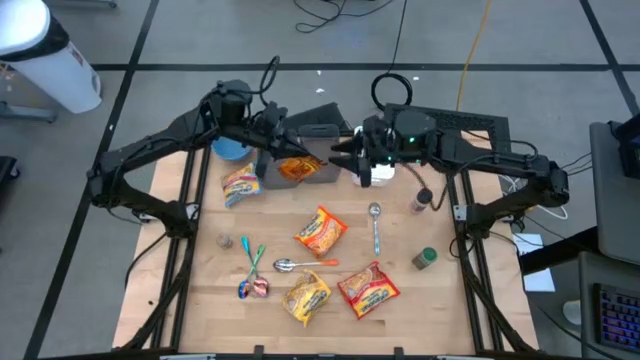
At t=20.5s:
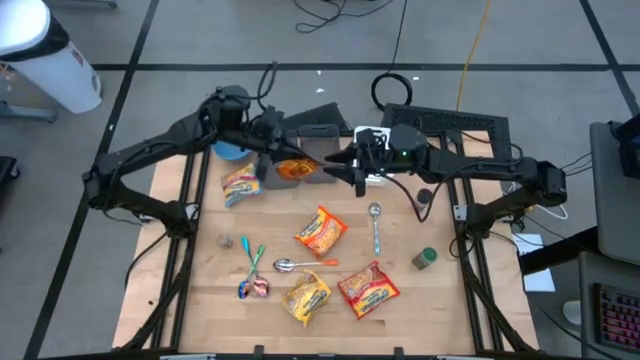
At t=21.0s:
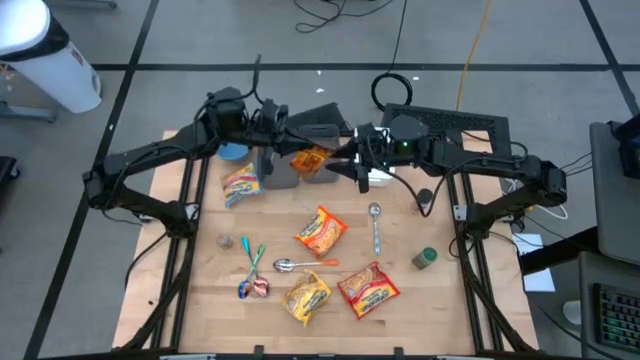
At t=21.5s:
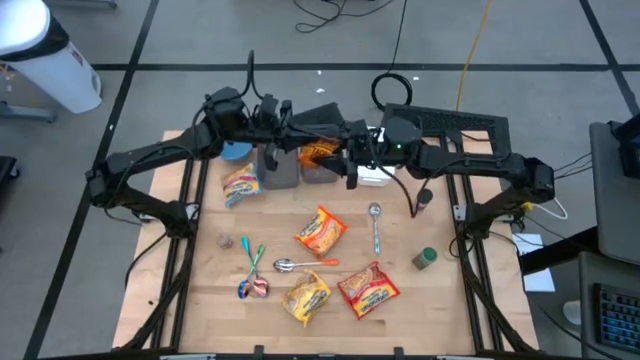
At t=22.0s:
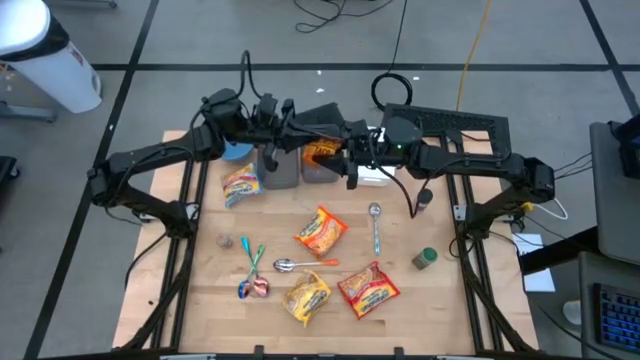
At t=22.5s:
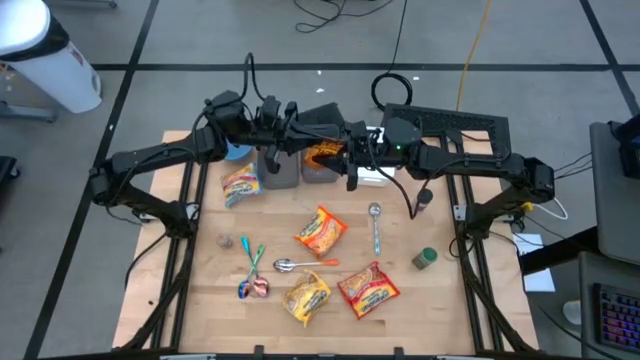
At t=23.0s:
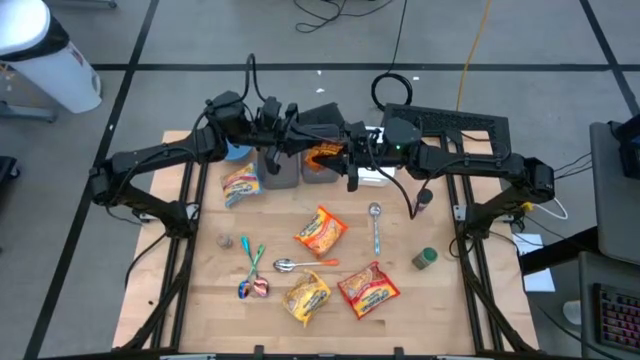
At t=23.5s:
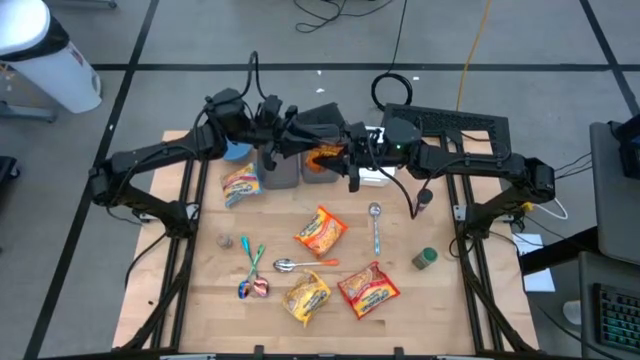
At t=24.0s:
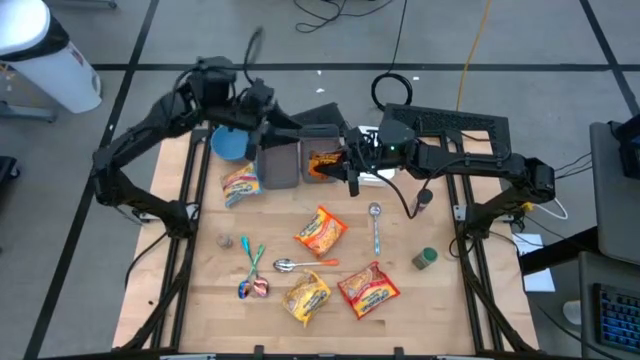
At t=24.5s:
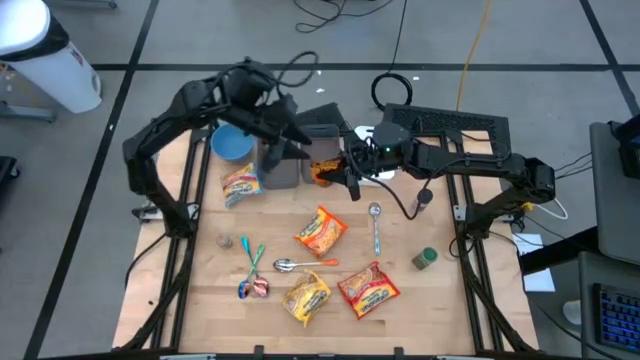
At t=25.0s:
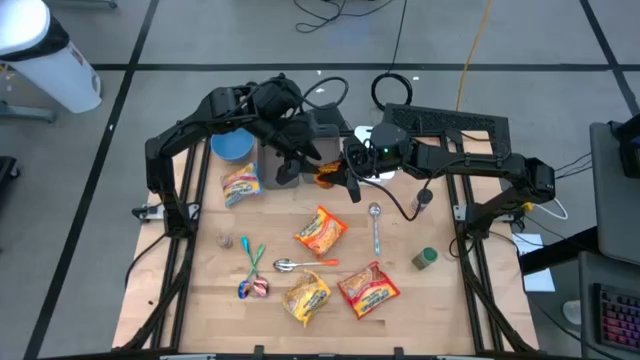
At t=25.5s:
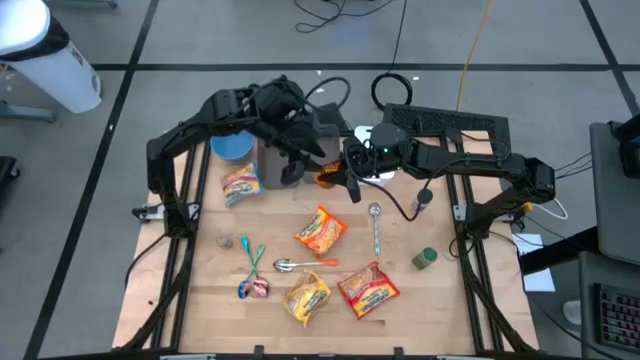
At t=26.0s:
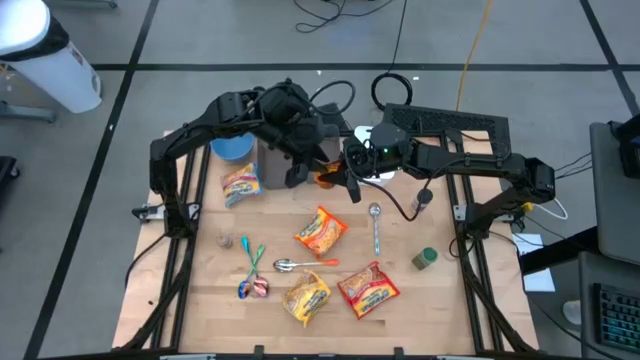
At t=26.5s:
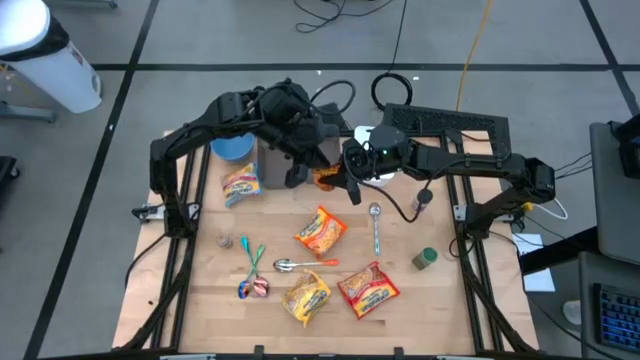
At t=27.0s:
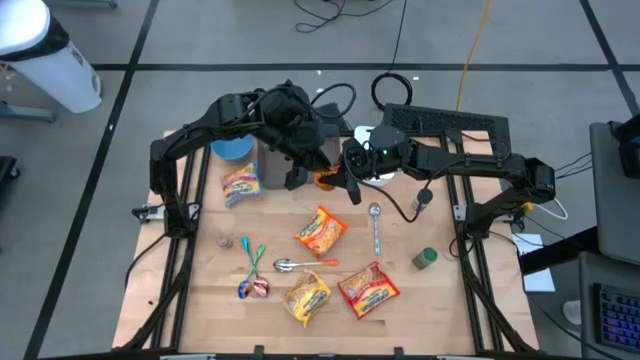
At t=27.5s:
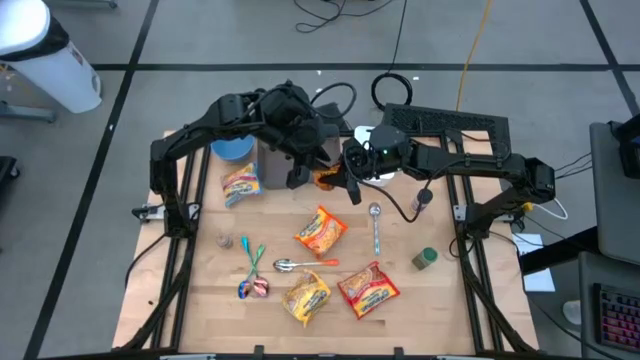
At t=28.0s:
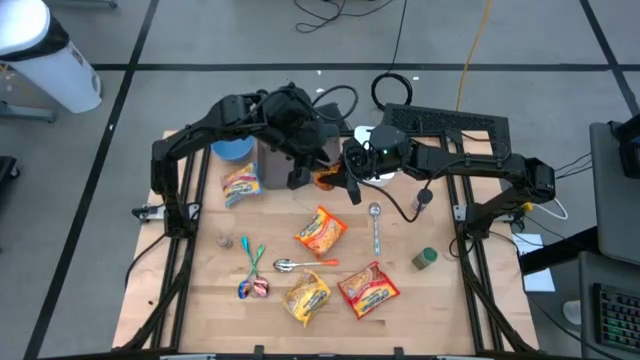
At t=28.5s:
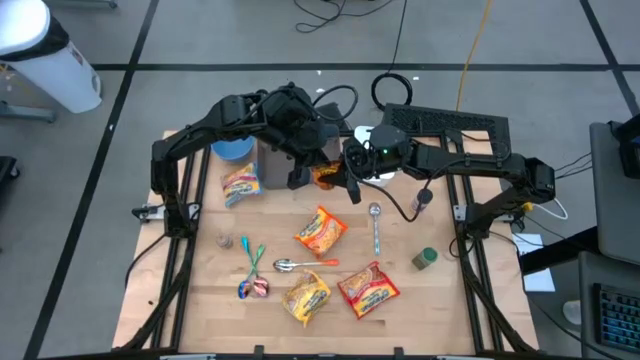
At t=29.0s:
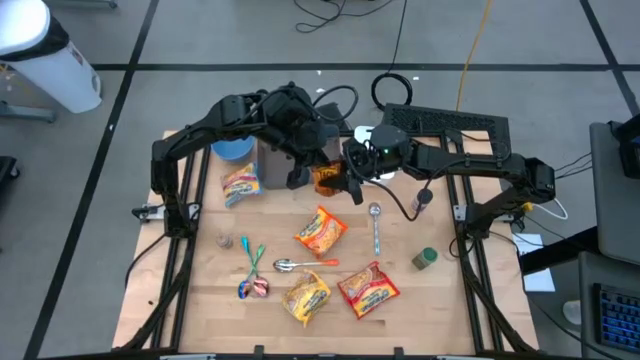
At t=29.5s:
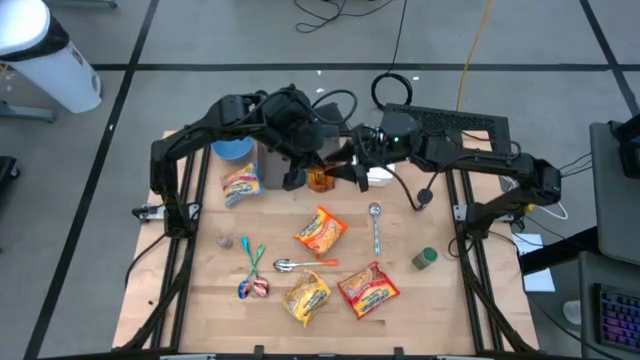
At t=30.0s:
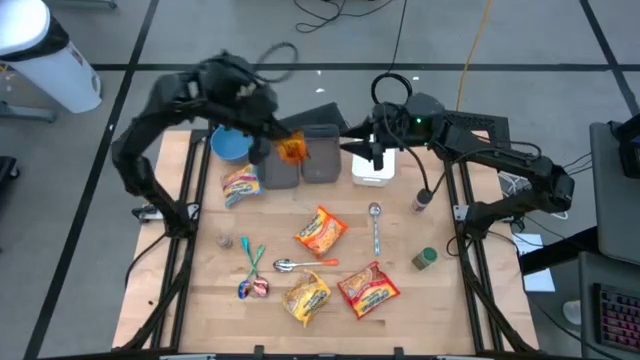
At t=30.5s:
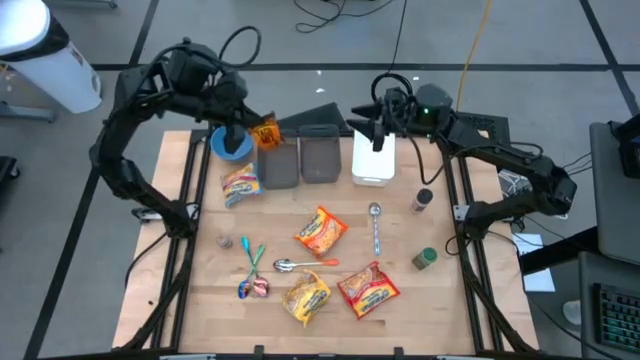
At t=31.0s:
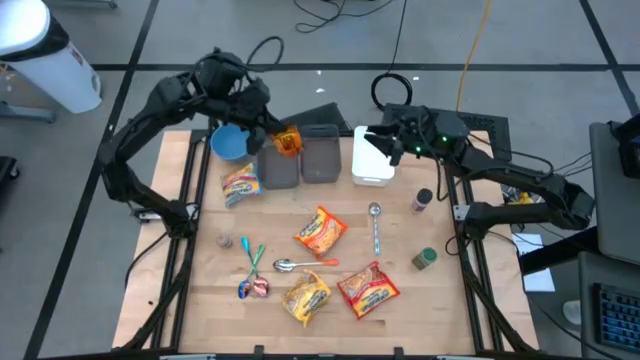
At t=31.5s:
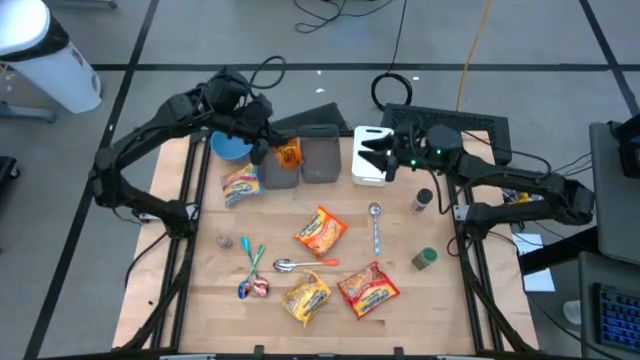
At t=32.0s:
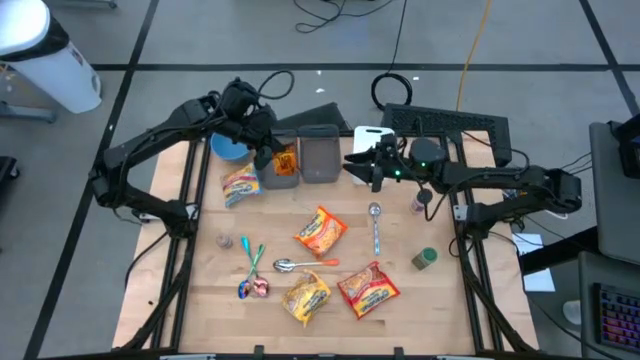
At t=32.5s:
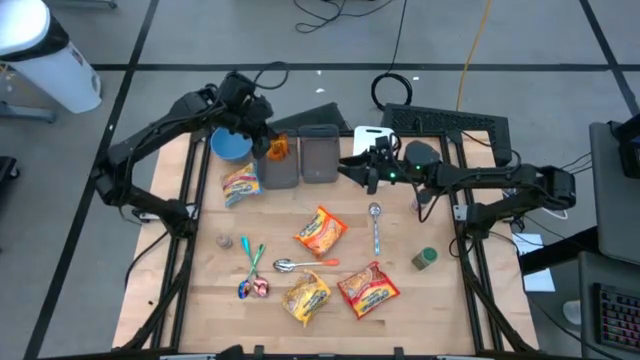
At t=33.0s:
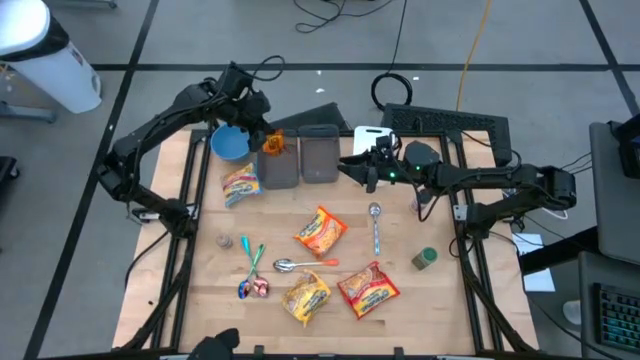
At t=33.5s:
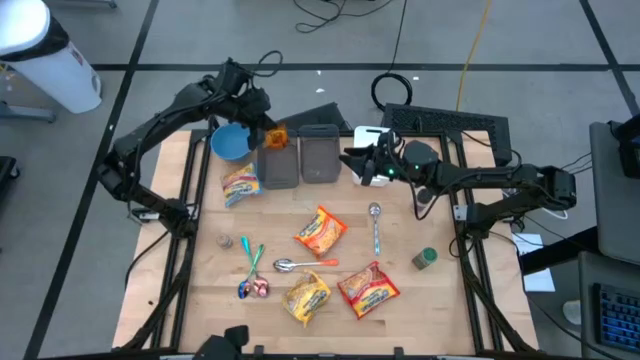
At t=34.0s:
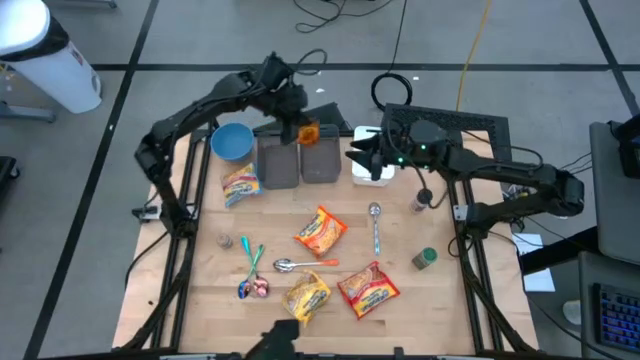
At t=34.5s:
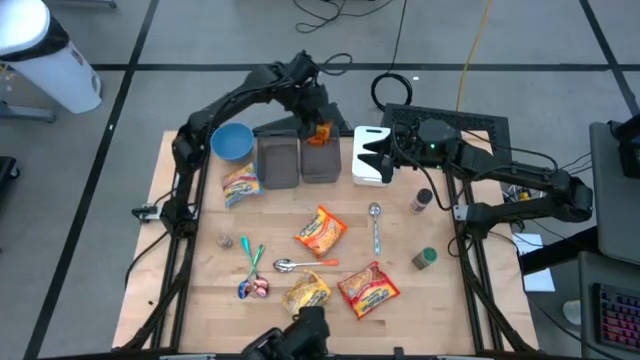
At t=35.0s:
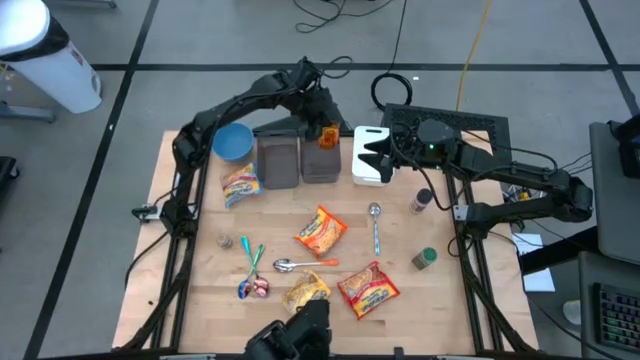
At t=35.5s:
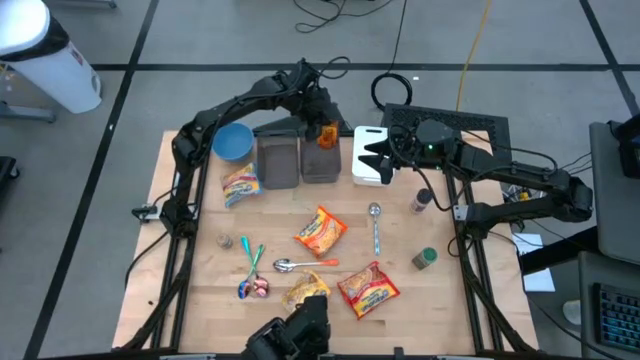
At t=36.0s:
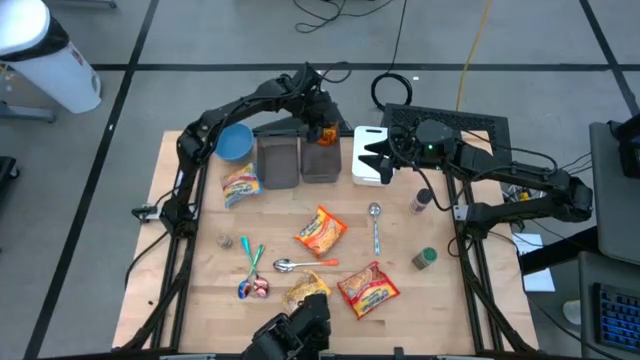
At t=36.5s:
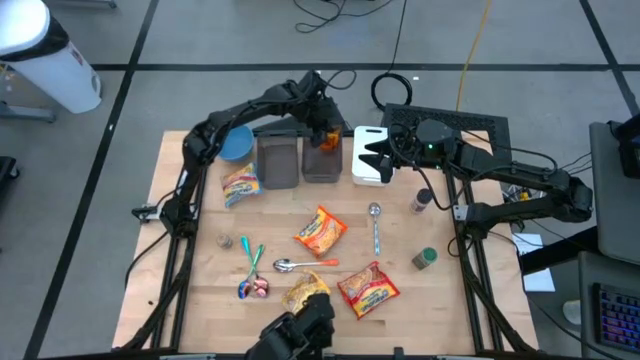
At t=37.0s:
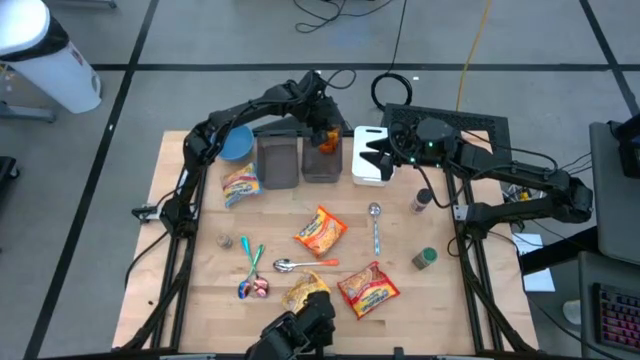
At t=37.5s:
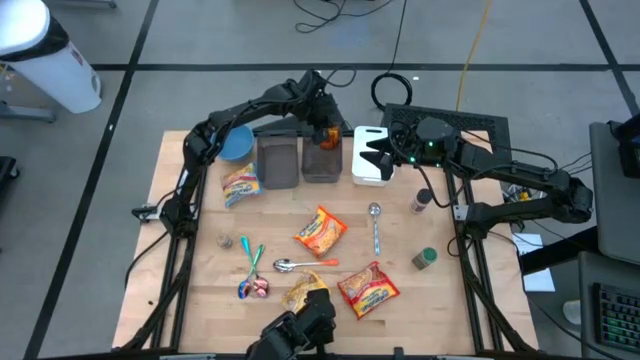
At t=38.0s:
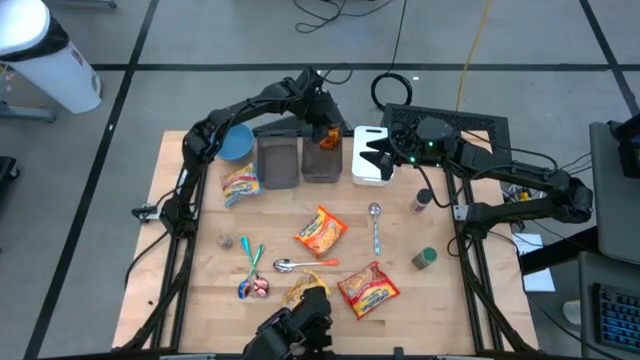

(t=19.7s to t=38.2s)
Task: Pick & Place Food Item
Put the orange seasoning pack into the right black bin
